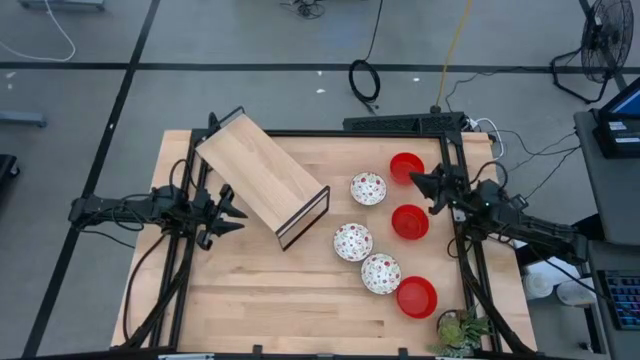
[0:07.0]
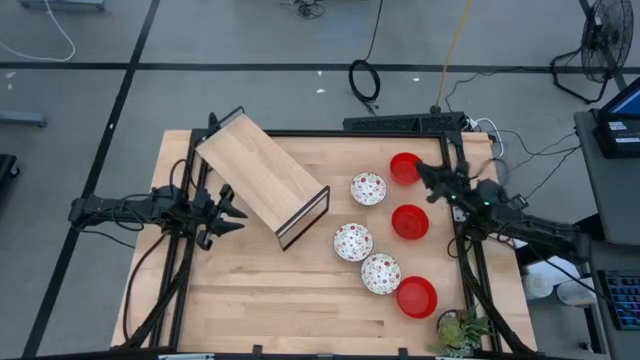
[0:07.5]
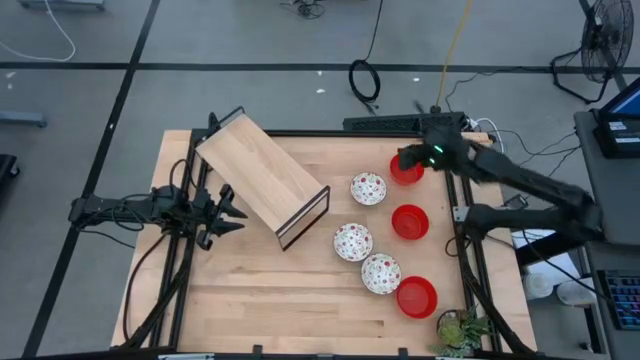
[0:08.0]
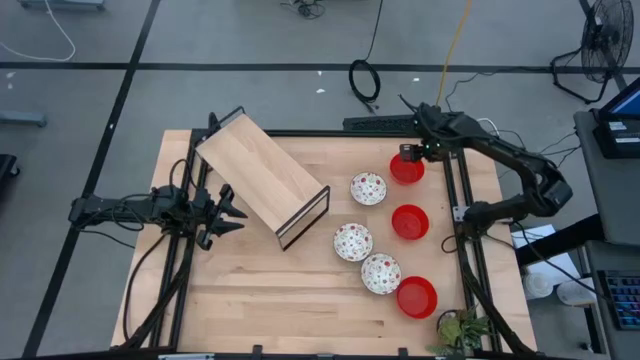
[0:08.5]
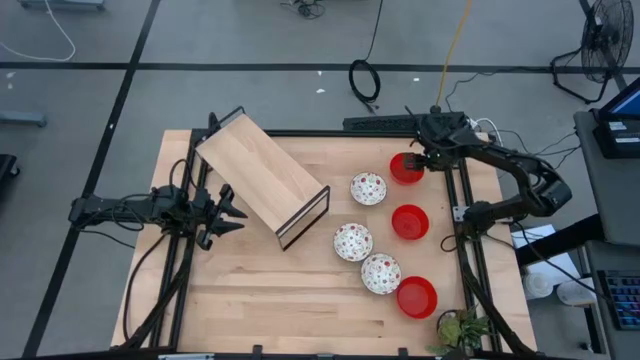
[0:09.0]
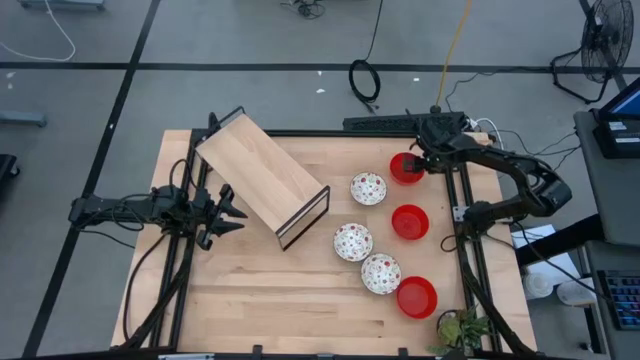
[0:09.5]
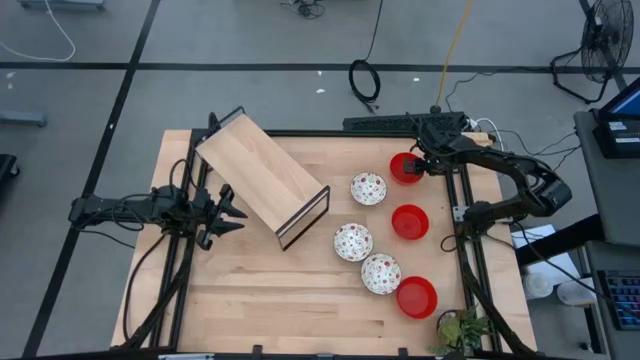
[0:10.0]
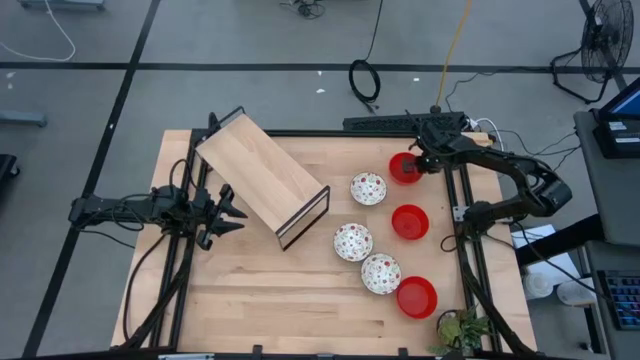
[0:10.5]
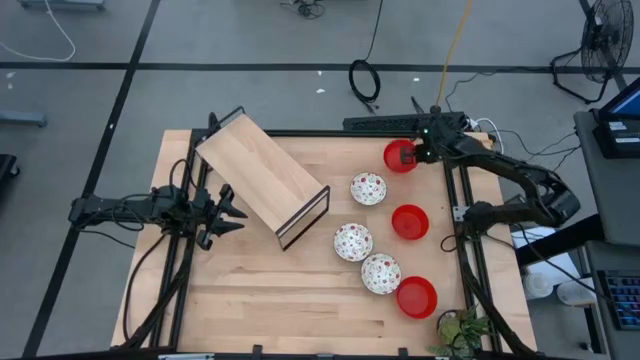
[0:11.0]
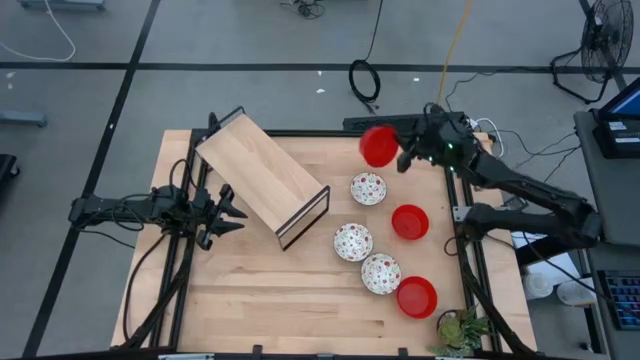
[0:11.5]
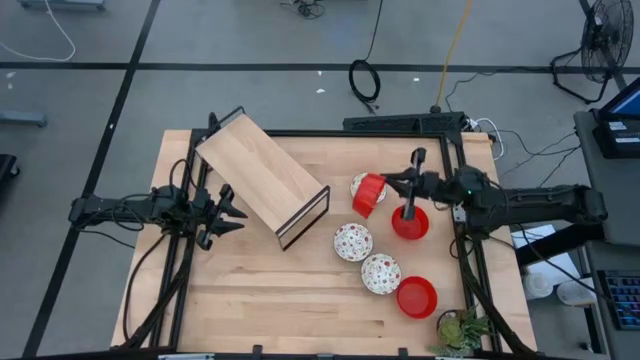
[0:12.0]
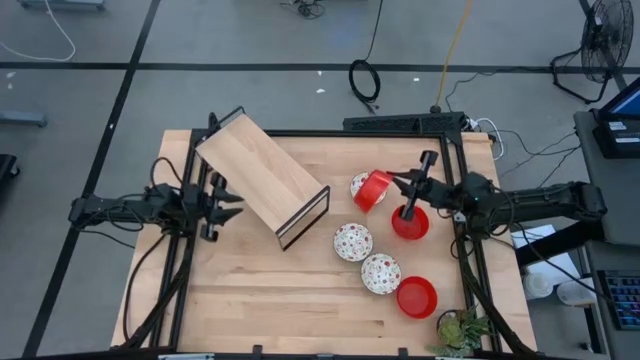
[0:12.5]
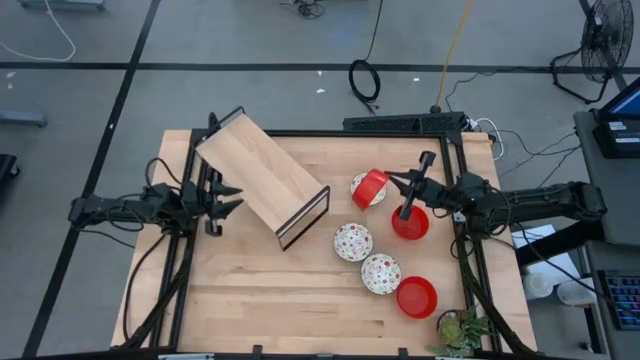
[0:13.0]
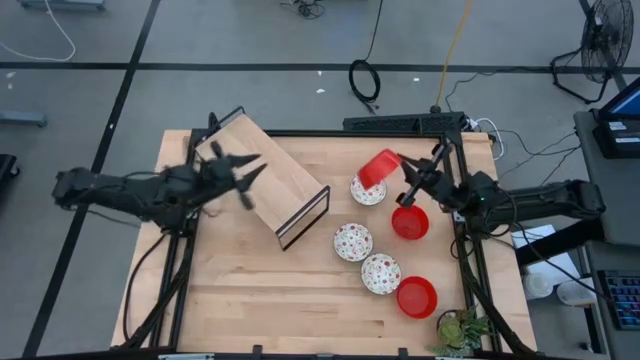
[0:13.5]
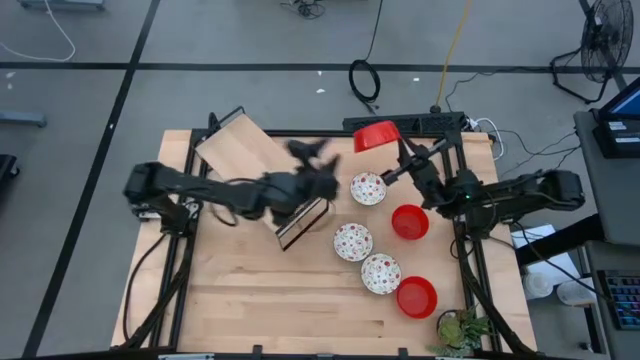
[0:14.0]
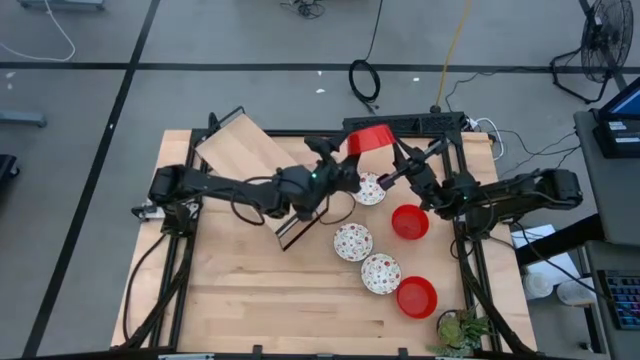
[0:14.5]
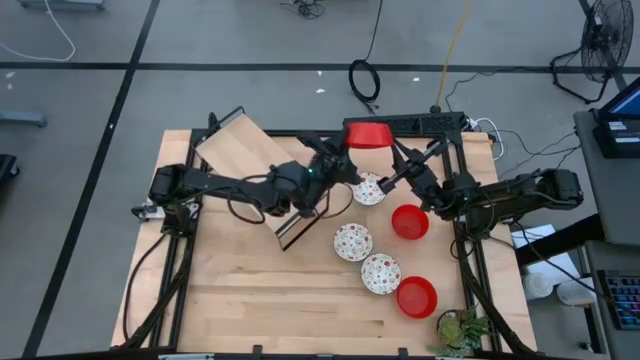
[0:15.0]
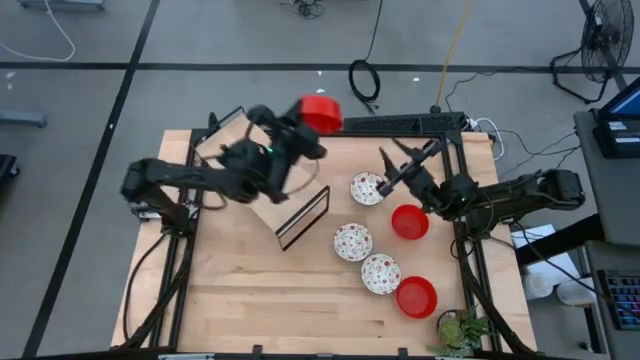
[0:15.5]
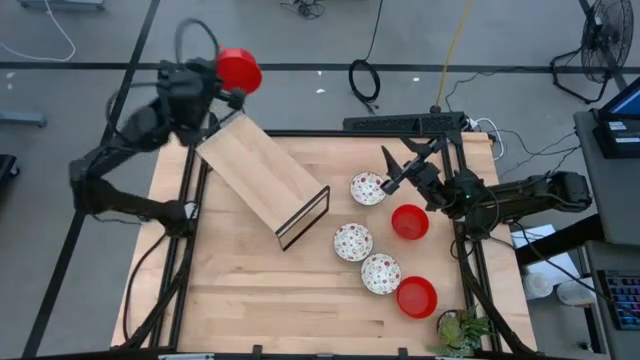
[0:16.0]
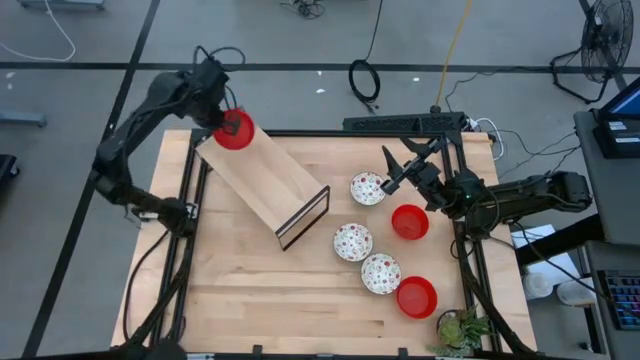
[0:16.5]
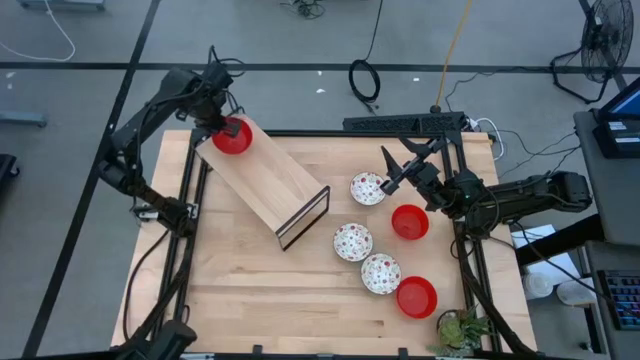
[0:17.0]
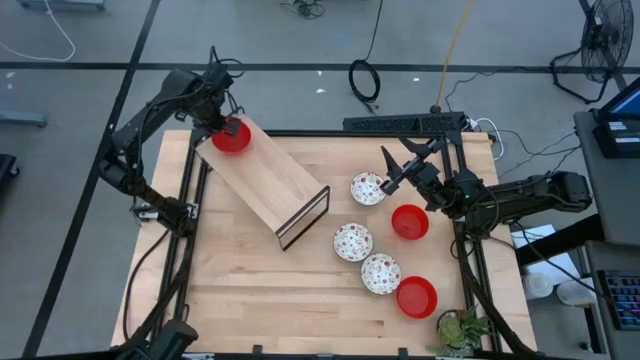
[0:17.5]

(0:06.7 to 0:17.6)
Task: Pick & Place Mini bowls
Put the top red bowl on the shelf

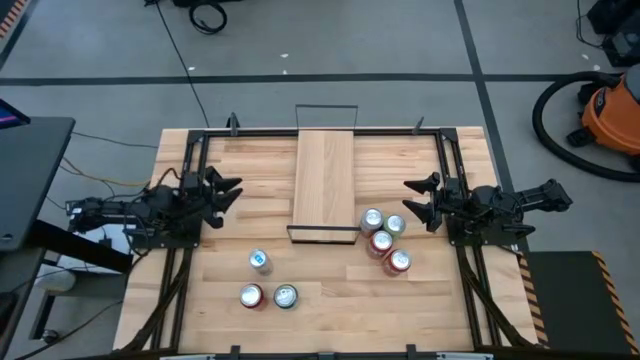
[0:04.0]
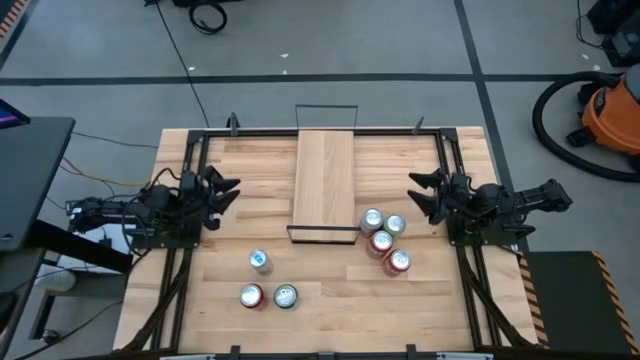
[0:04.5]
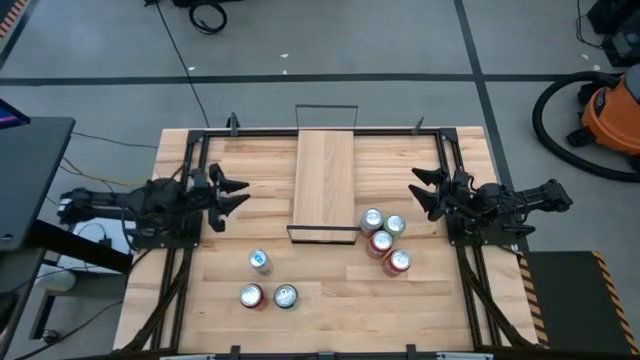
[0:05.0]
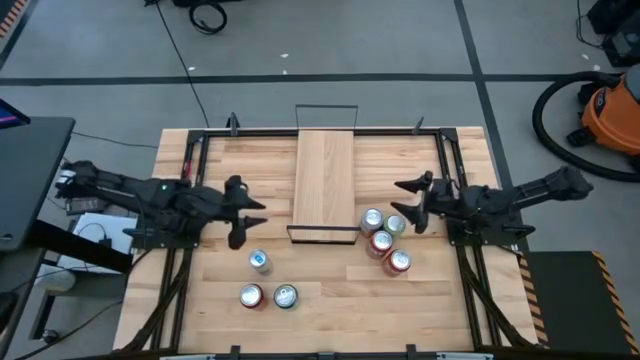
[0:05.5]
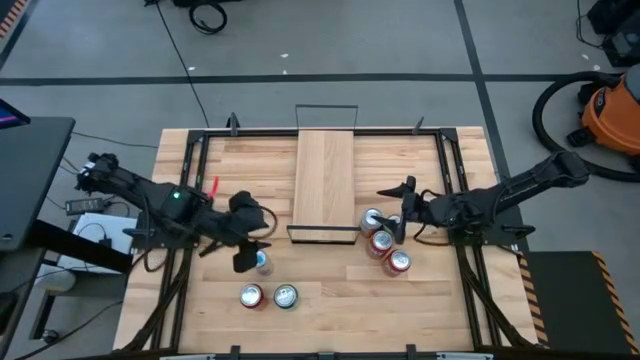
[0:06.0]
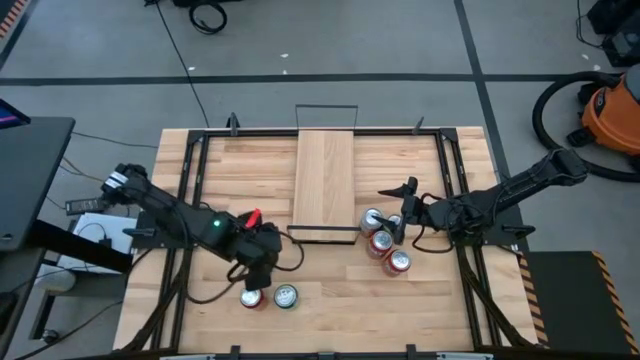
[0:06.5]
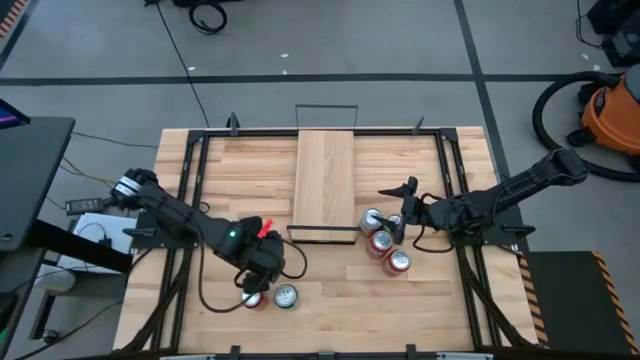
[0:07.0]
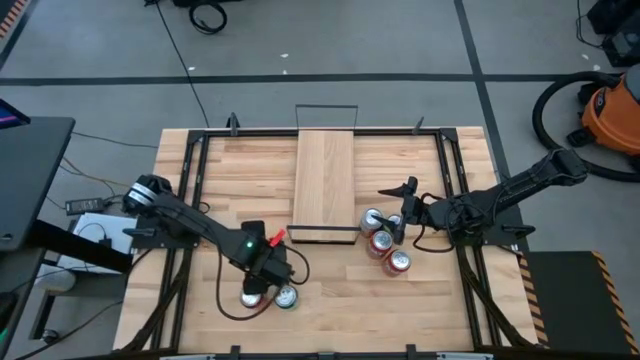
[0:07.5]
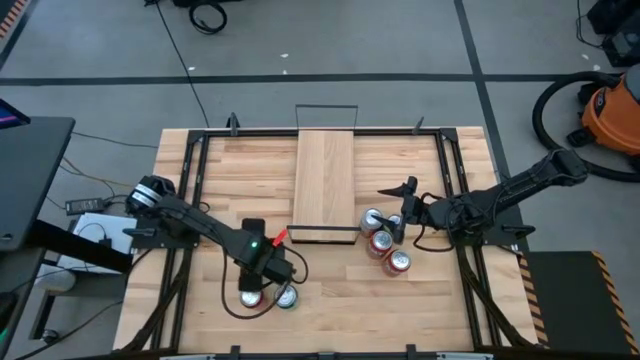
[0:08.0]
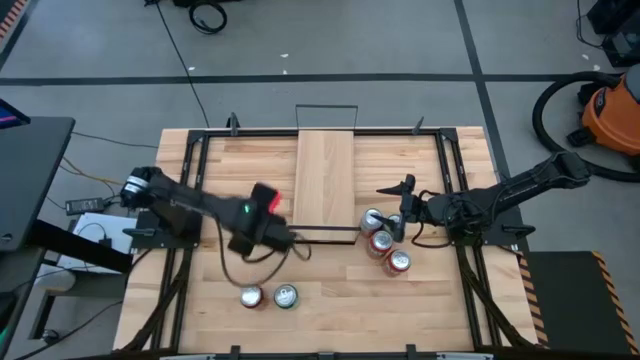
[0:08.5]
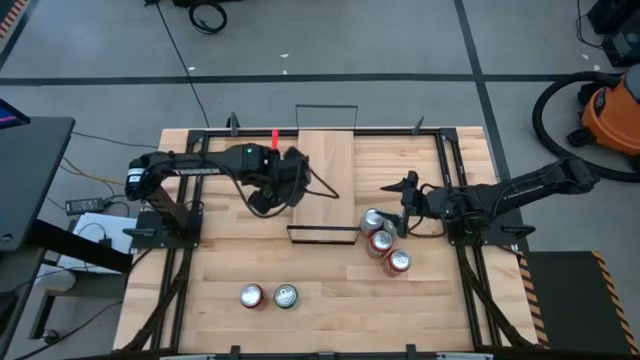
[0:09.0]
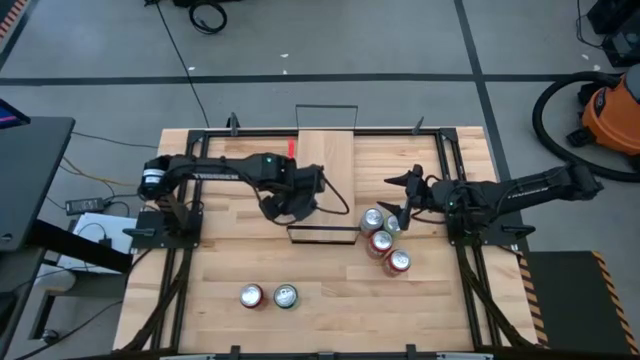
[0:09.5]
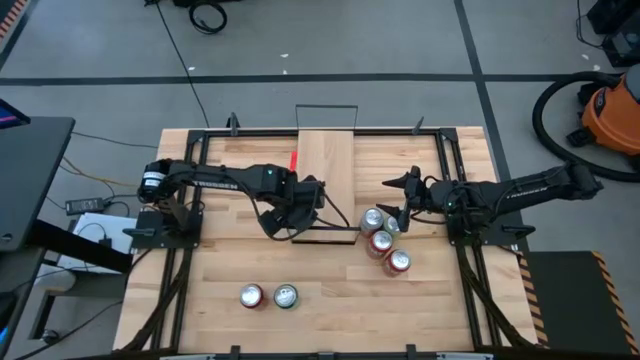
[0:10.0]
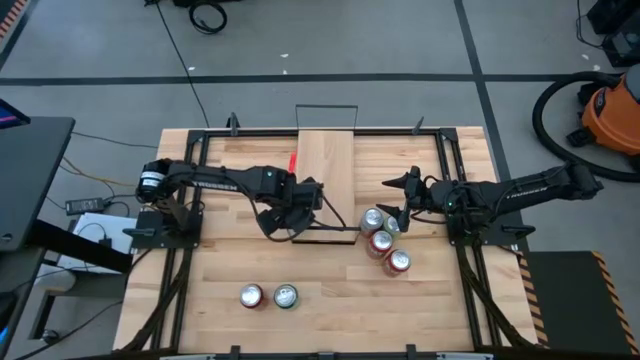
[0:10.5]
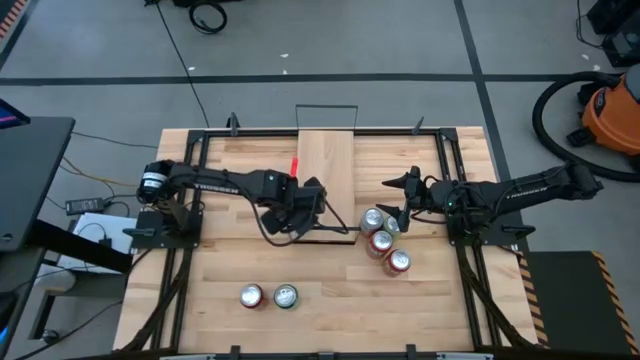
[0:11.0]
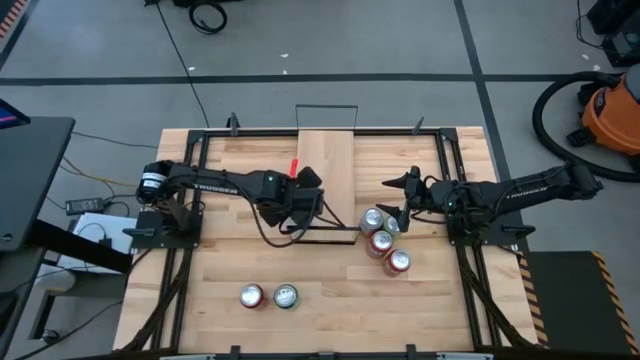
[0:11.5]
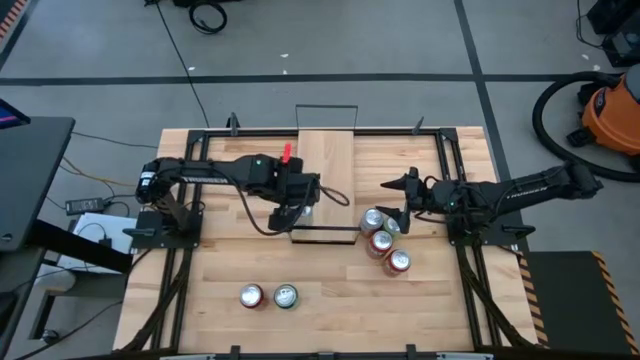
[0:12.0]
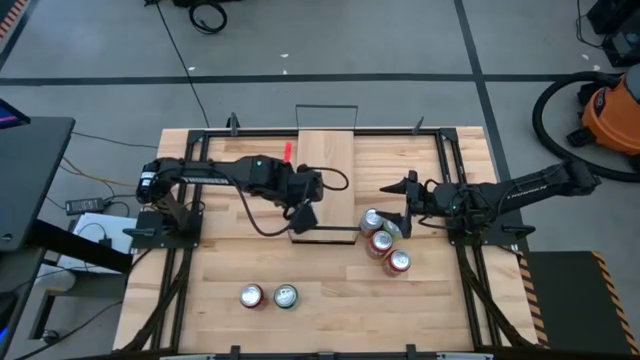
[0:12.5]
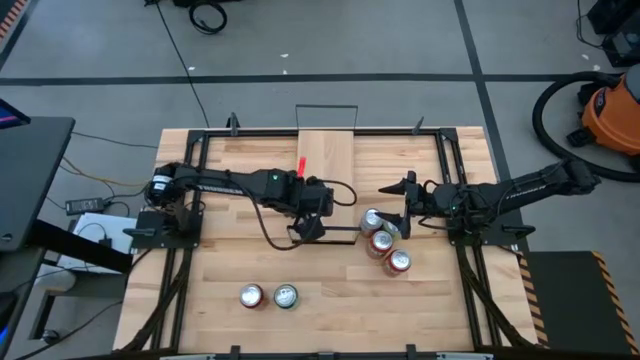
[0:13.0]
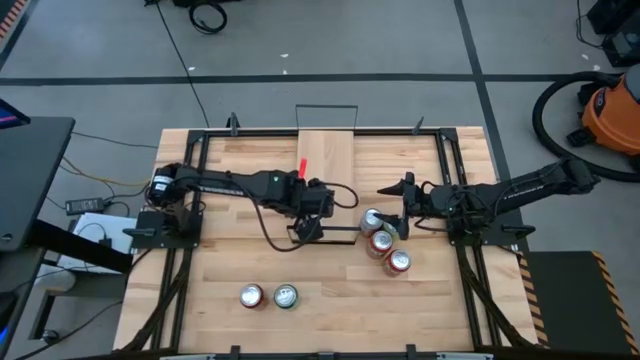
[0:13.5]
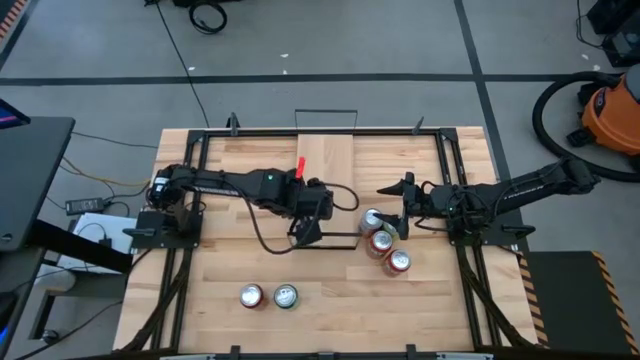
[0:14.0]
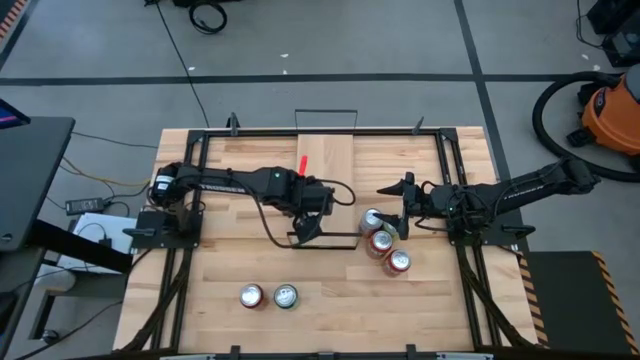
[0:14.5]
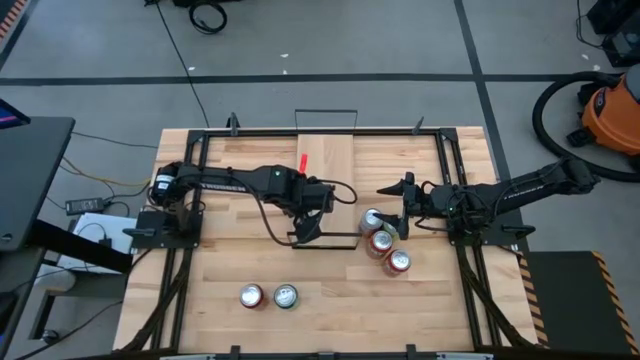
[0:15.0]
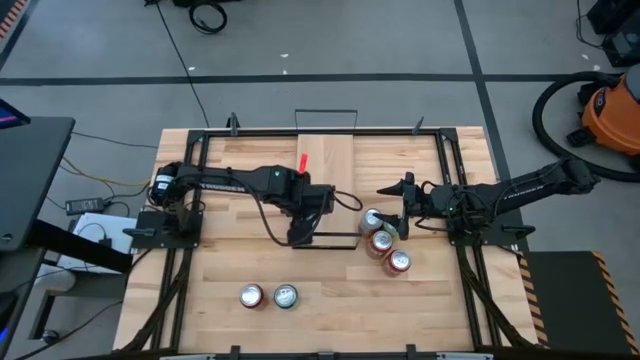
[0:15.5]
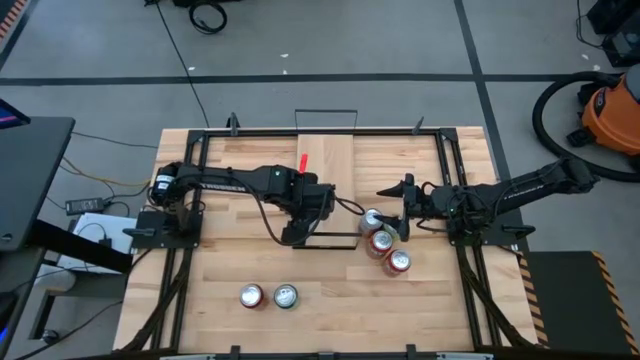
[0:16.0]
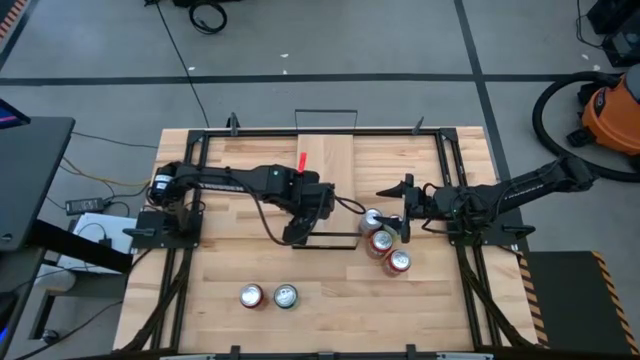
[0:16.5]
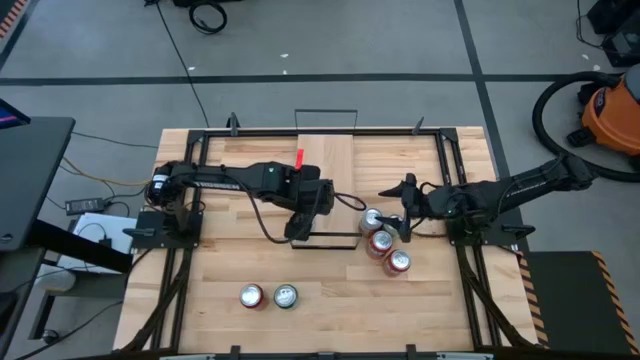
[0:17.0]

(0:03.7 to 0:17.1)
Task: Place canned beverage on shelf
Put the blue soda can on the shelf
